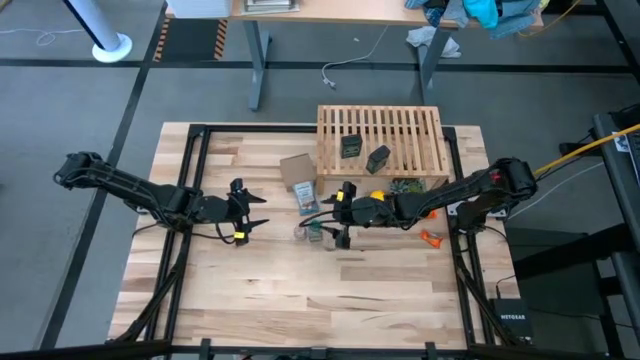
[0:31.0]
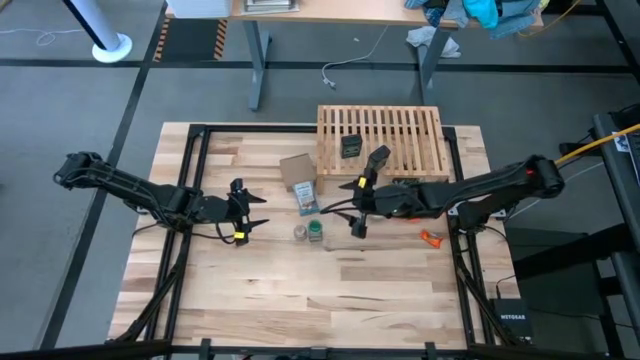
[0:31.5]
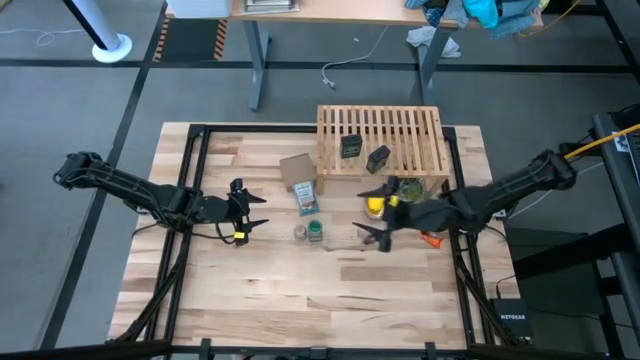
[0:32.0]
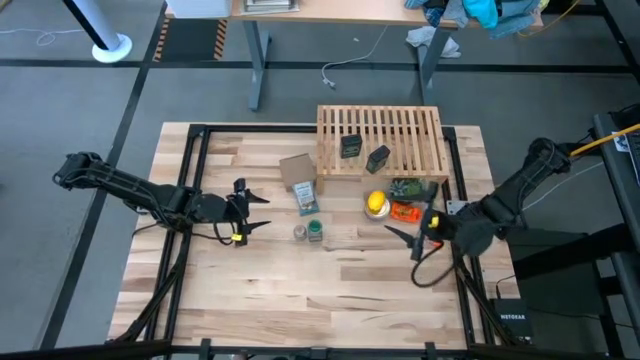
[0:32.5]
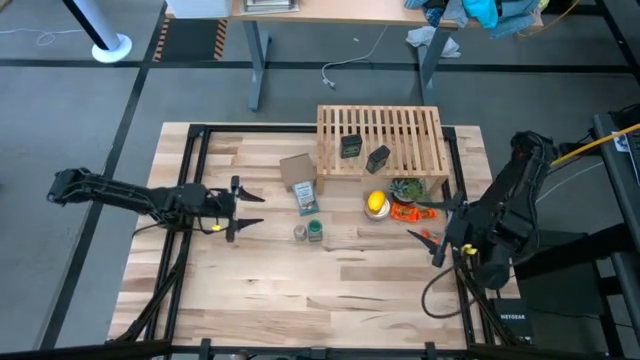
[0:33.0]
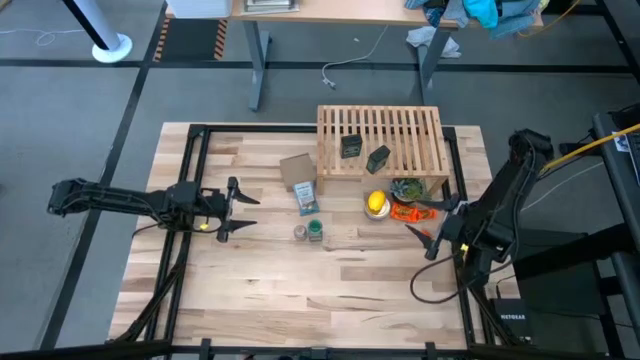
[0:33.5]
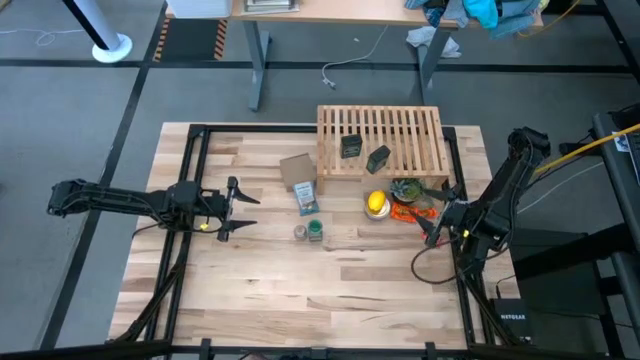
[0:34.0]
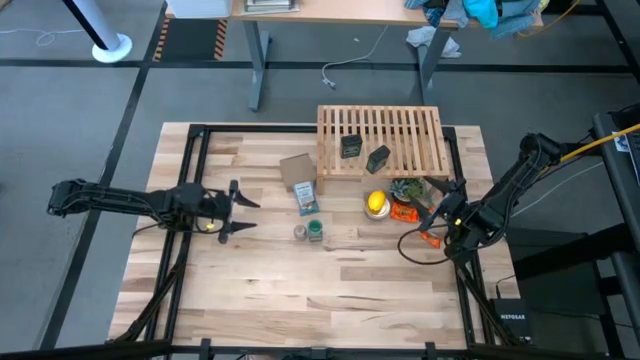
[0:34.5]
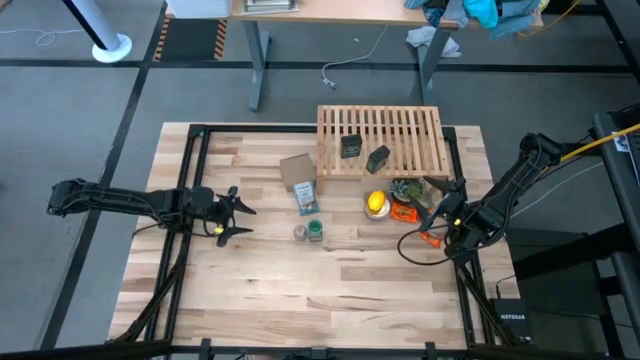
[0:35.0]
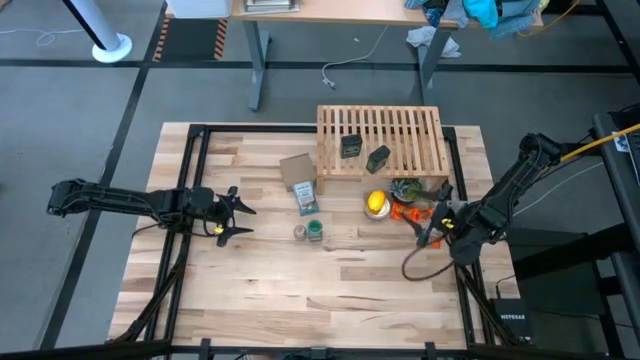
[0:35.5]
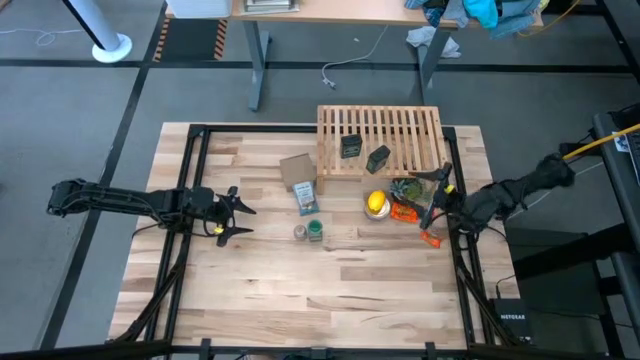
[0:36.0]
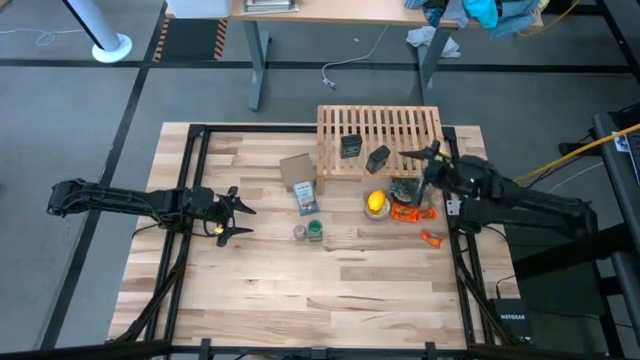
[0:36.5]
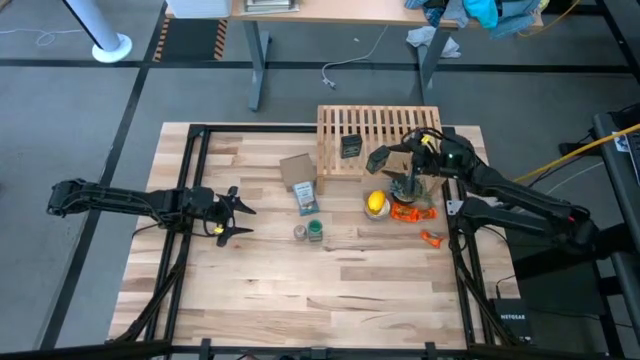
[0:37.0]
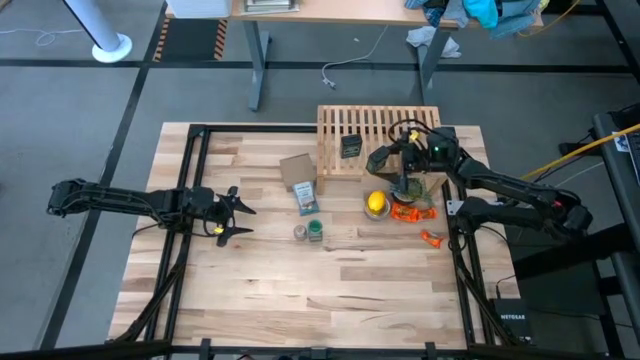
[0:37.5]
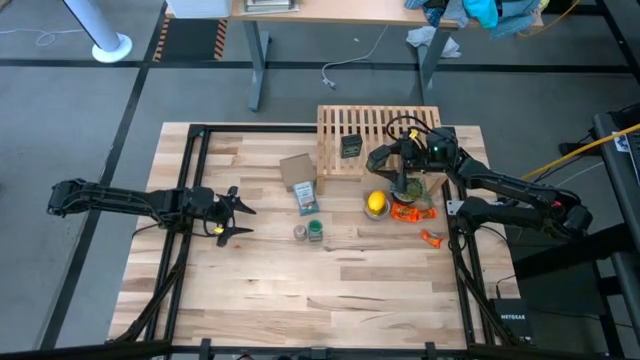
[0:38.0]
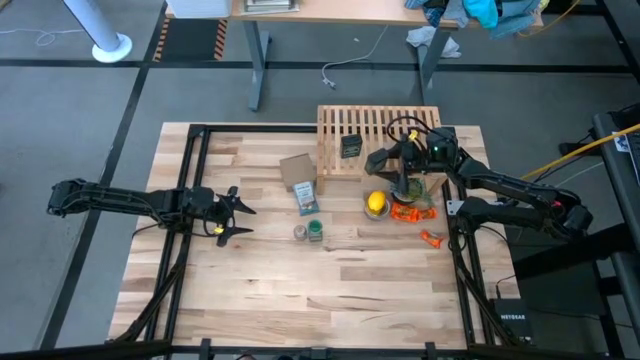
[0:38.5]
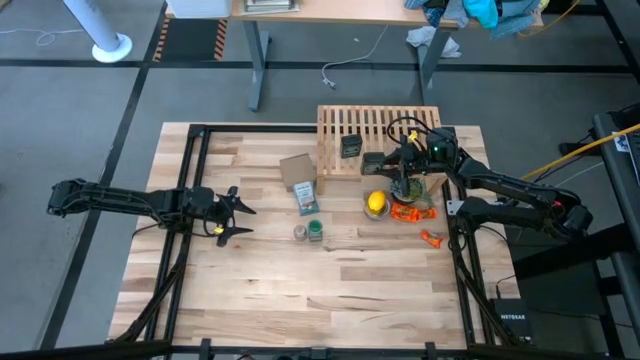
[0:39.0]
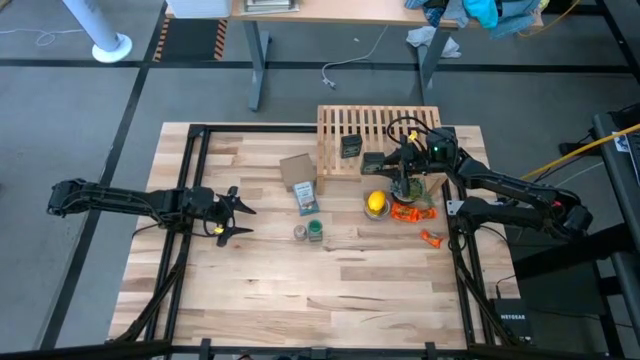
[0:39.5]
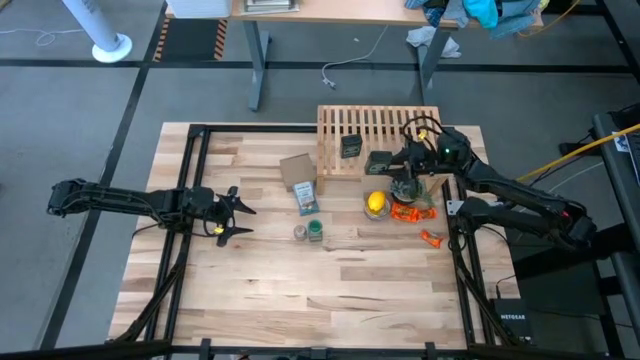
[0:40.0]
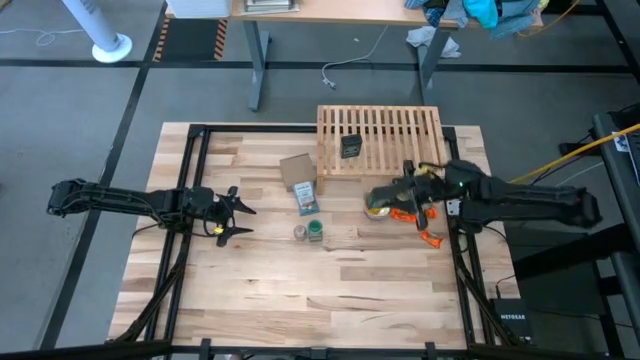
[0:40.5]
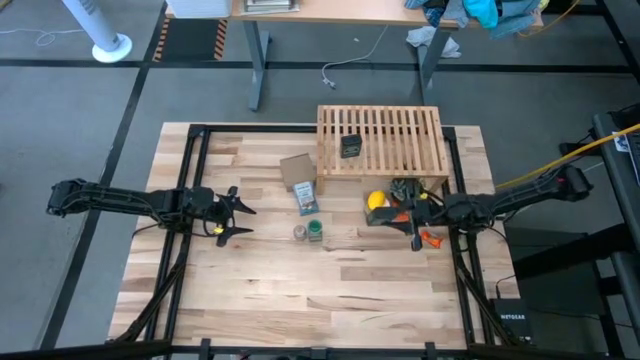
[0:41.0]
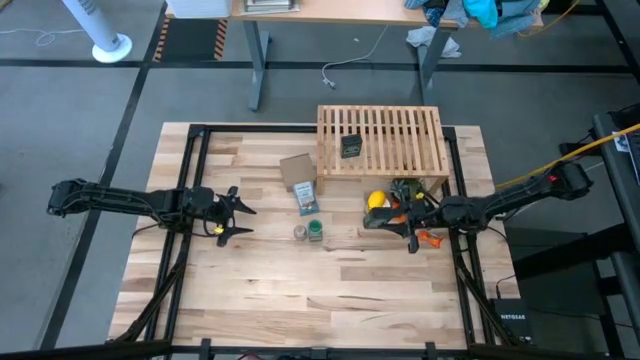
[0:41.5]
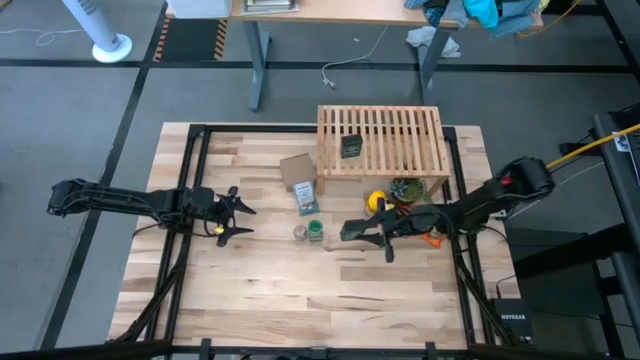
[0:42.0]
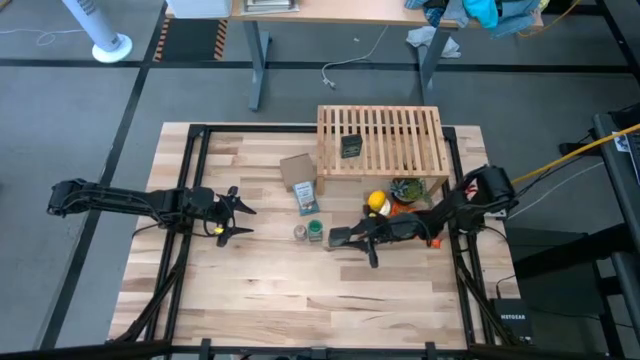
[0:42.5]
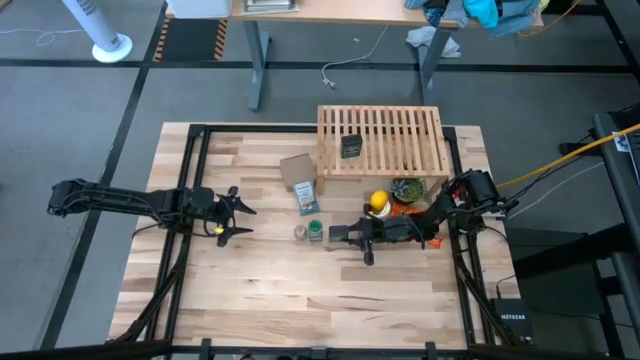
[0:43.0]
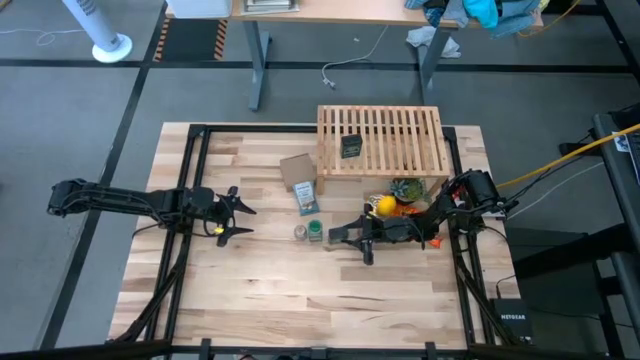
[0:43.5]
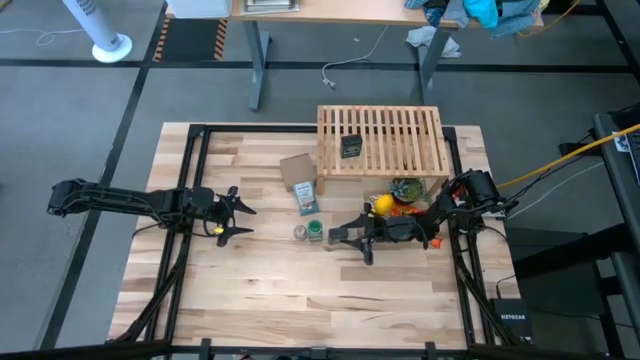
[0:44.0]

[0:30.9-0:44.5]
Task: Shelf spices
Remove the right black seasoning can from the shelf

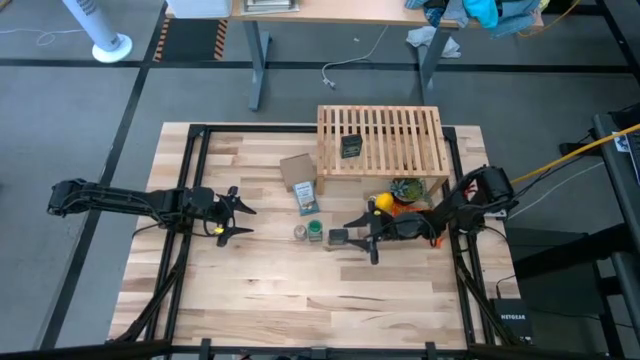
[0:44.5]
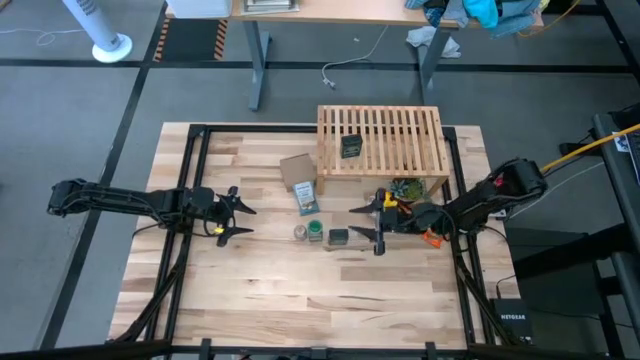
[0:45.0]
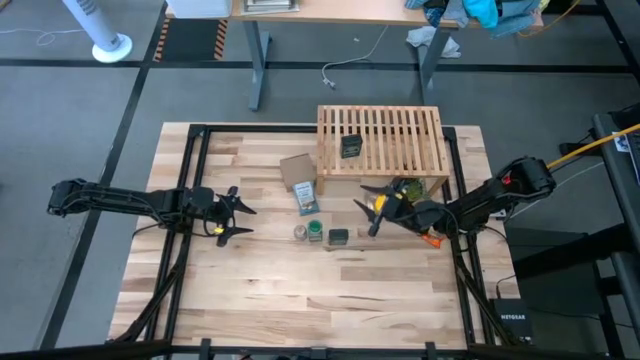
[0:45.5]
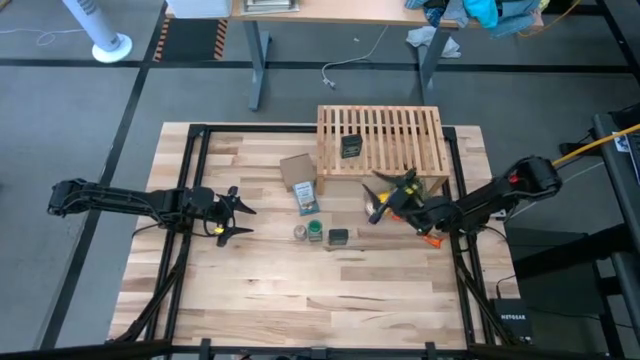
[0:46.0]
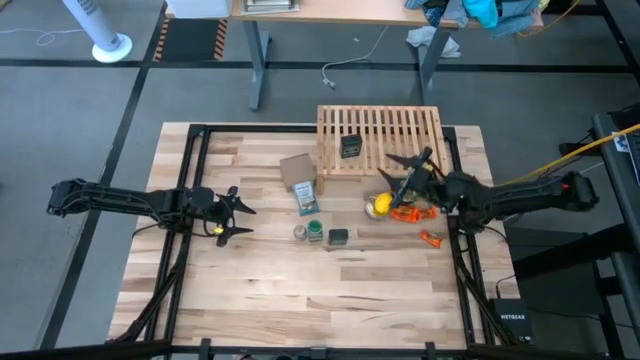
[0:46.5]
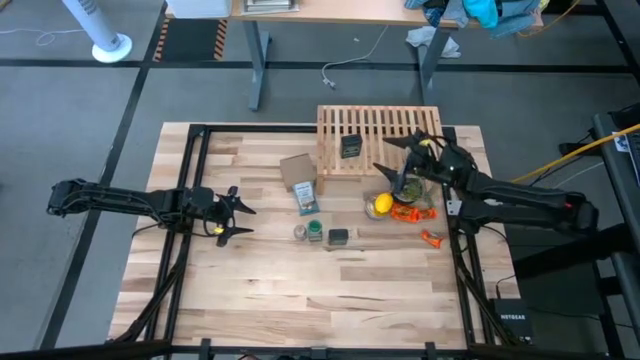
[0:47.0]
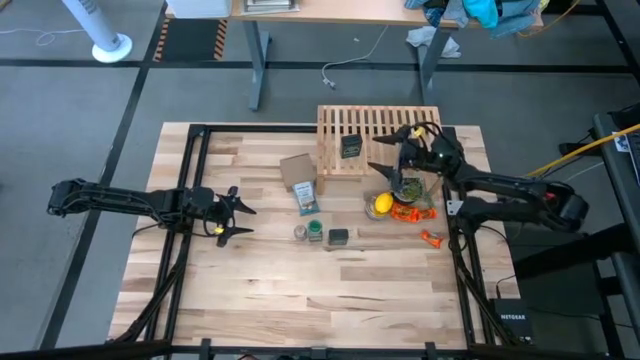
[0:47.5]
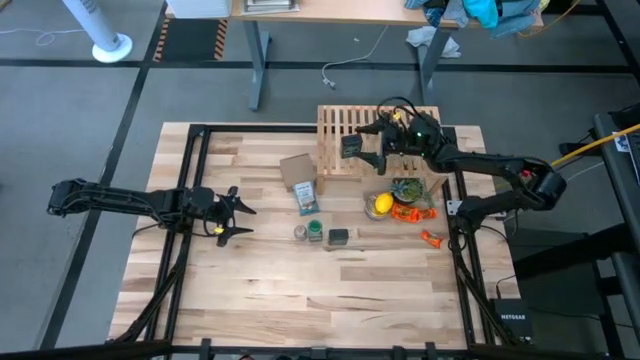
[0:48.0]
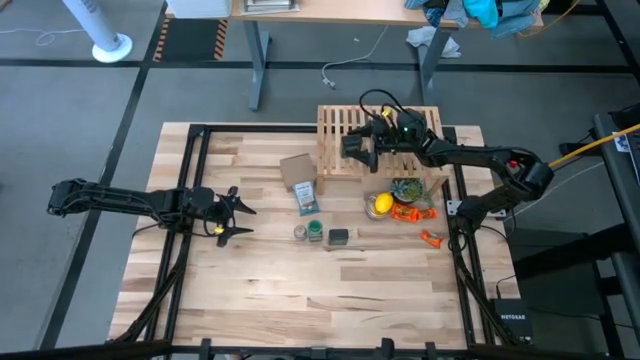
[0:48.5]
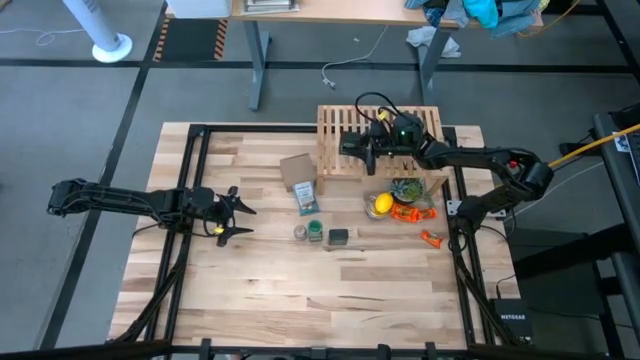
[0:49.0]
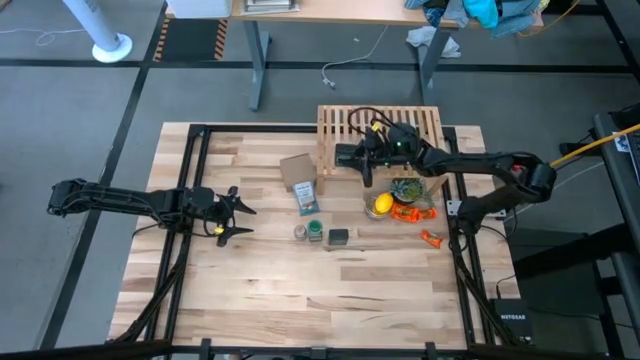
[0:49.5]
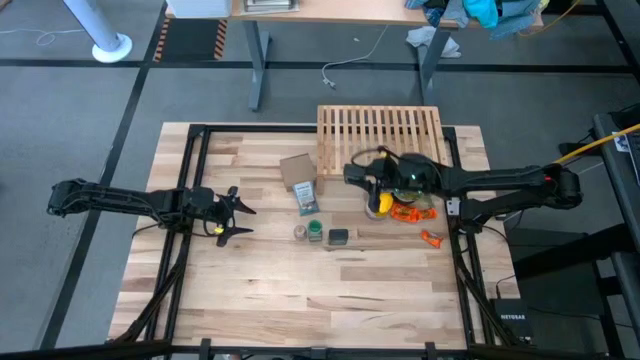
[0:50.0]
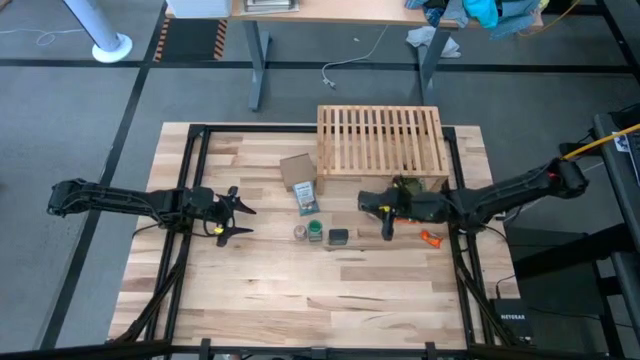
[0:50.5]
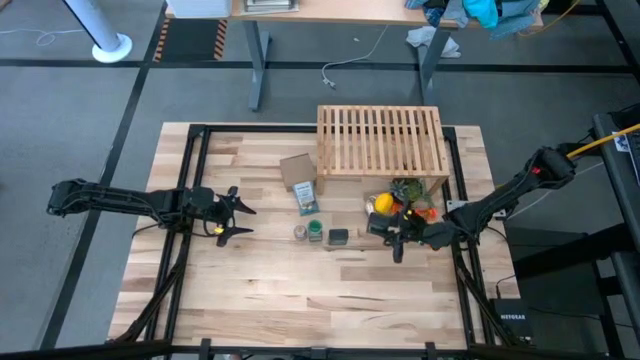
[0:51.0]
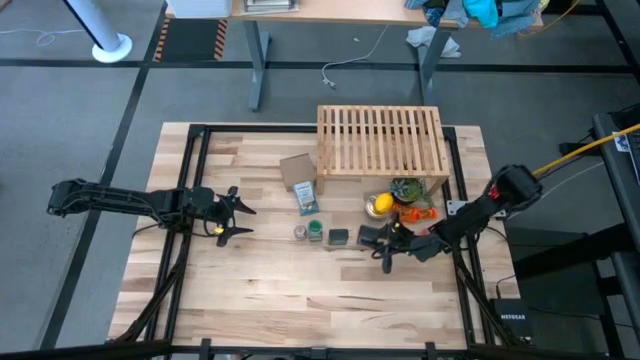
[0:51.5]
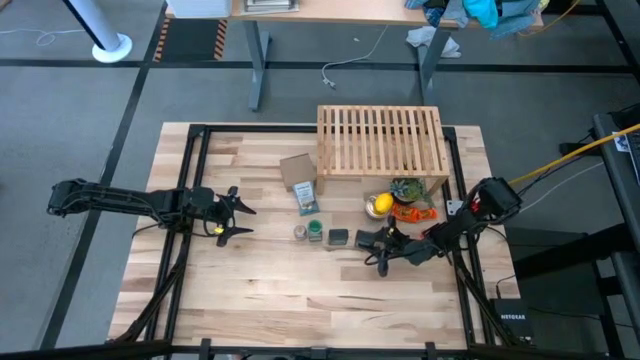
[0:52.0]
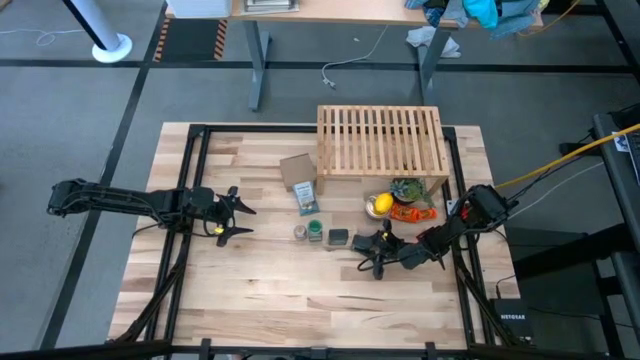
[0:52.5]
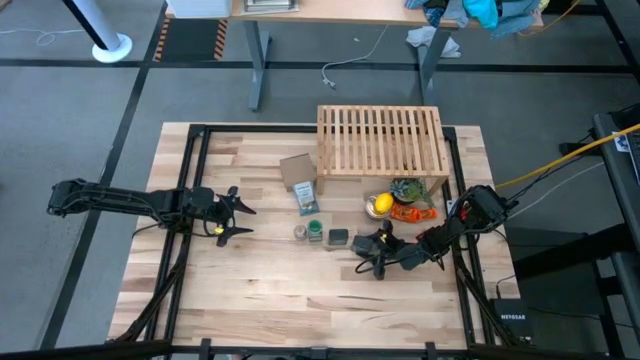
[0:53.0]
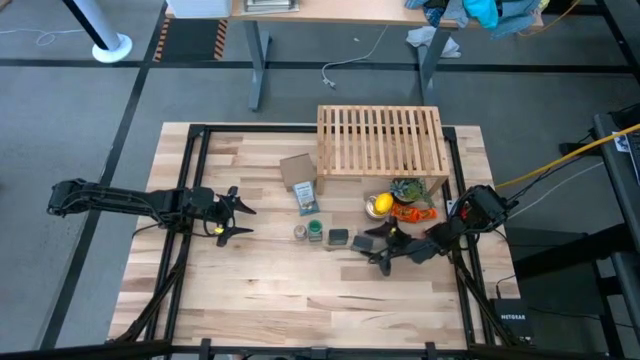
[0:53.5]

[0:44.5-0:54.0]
Remove the black seasoning can from the shelf
